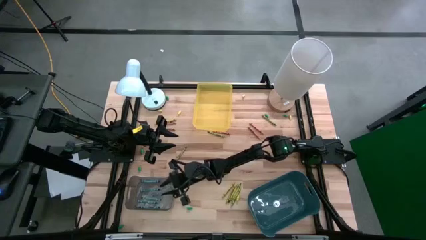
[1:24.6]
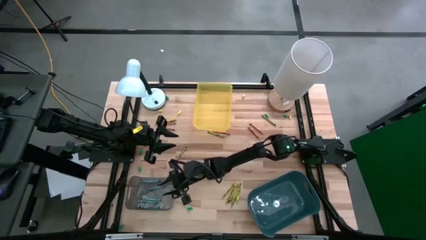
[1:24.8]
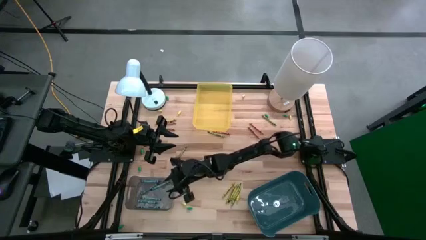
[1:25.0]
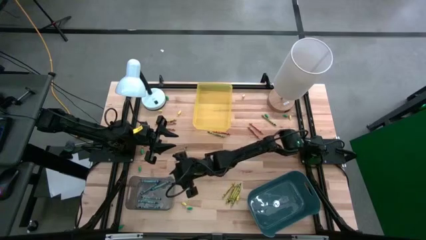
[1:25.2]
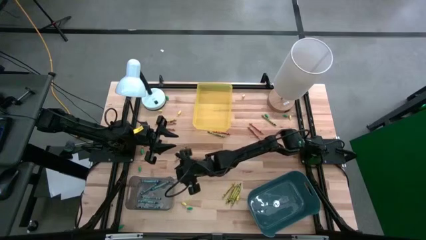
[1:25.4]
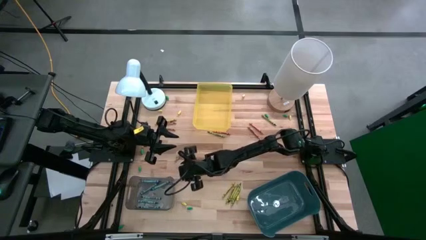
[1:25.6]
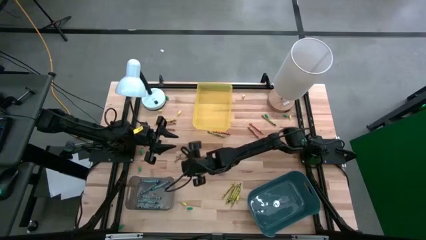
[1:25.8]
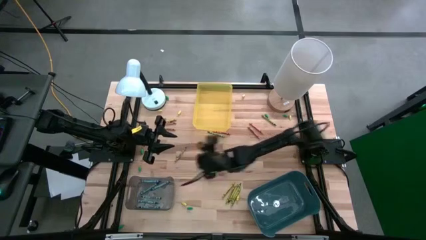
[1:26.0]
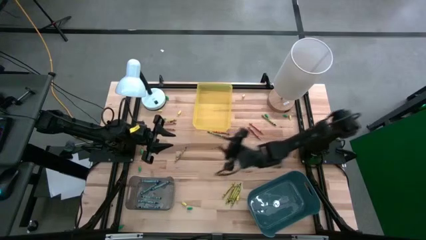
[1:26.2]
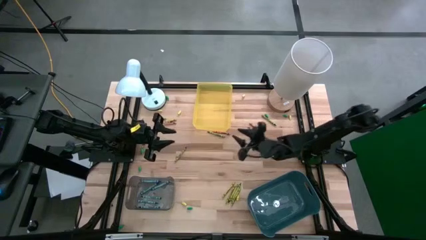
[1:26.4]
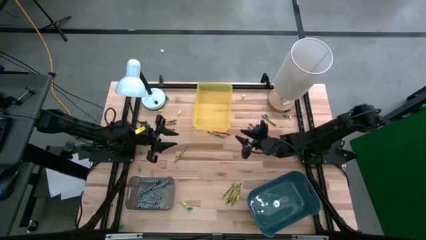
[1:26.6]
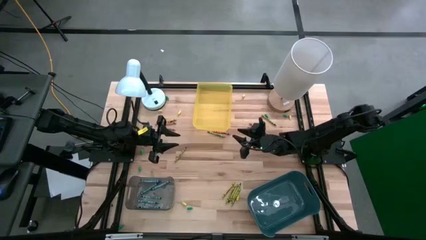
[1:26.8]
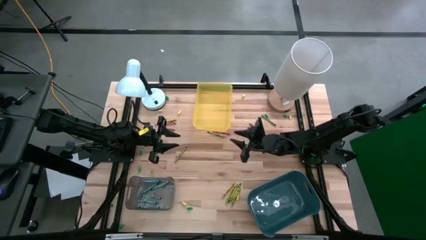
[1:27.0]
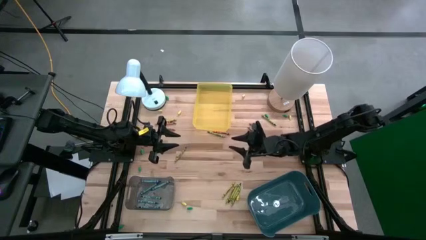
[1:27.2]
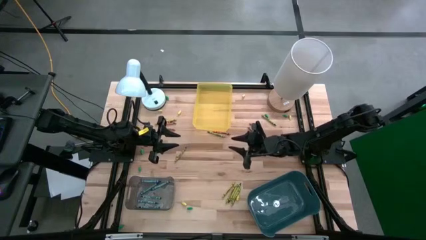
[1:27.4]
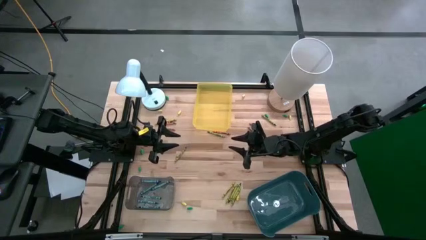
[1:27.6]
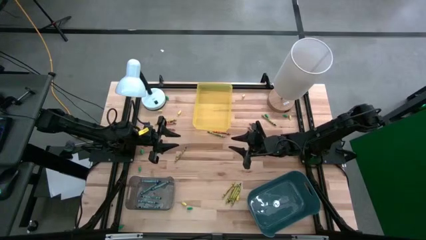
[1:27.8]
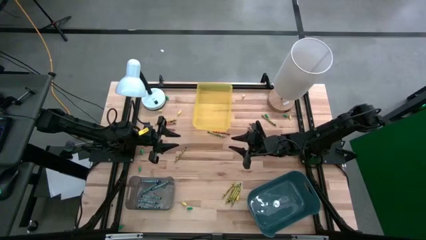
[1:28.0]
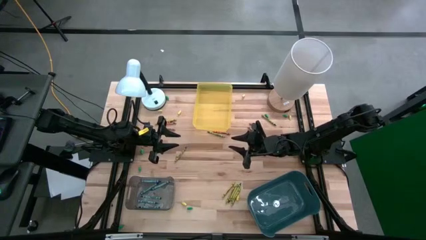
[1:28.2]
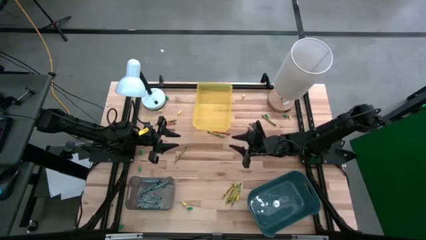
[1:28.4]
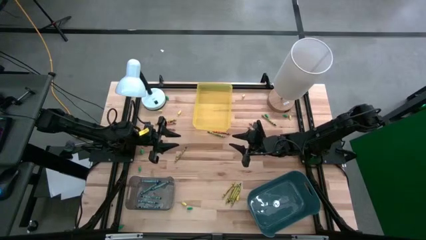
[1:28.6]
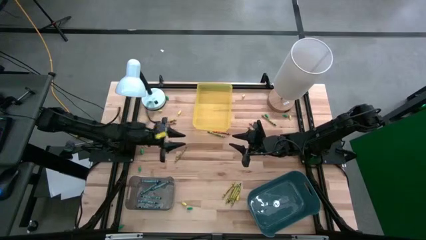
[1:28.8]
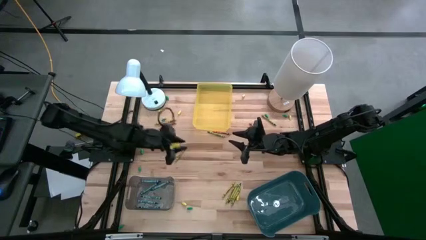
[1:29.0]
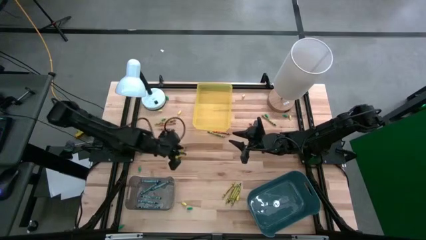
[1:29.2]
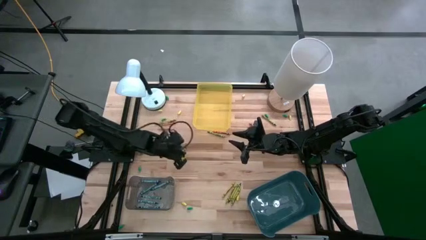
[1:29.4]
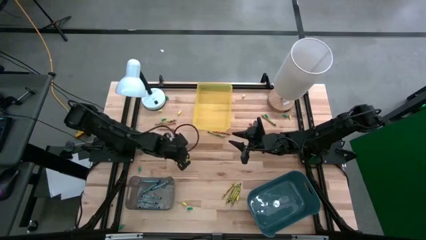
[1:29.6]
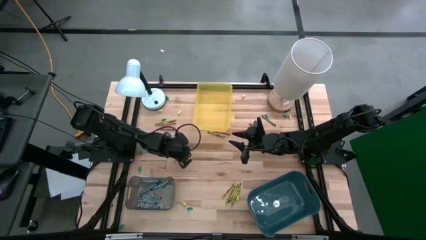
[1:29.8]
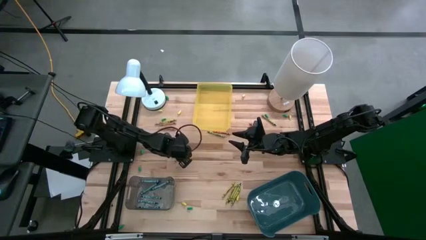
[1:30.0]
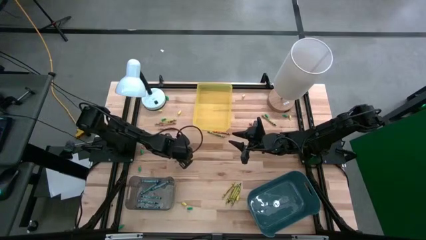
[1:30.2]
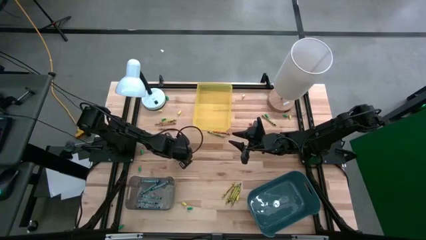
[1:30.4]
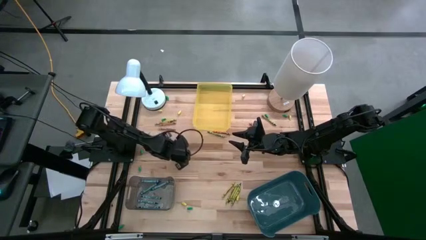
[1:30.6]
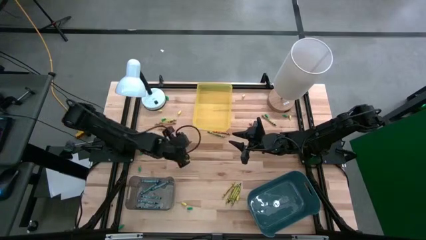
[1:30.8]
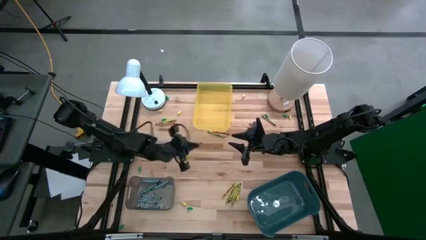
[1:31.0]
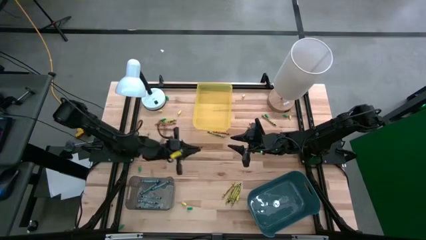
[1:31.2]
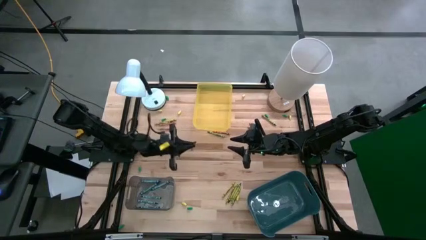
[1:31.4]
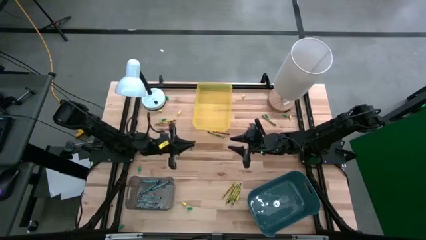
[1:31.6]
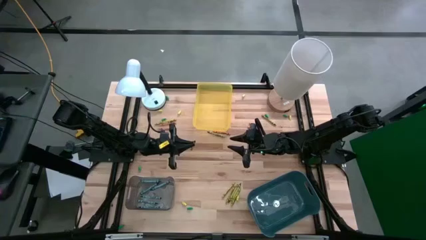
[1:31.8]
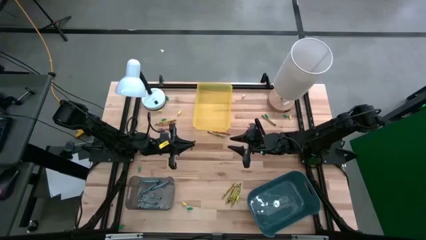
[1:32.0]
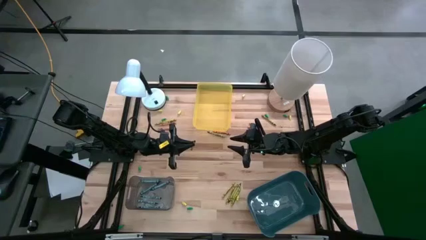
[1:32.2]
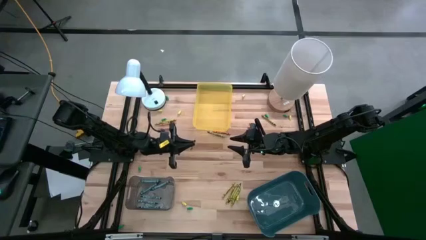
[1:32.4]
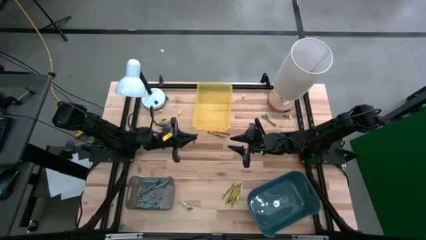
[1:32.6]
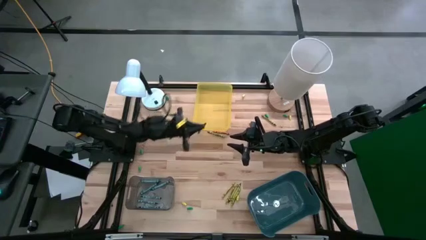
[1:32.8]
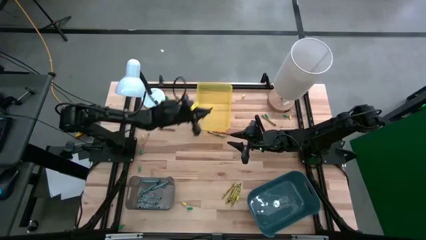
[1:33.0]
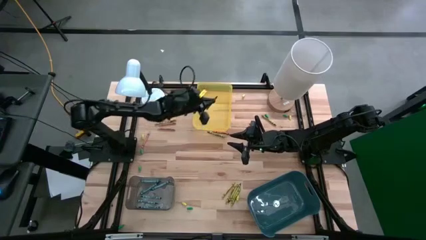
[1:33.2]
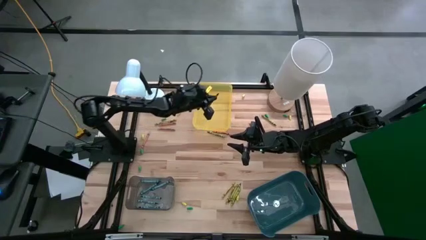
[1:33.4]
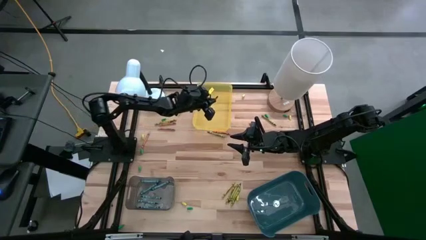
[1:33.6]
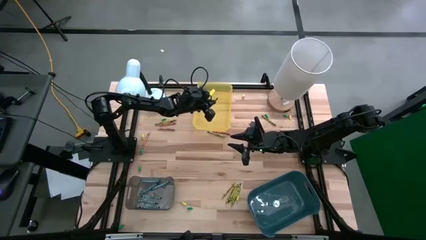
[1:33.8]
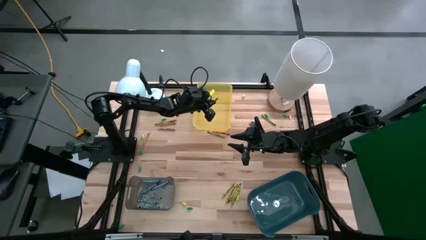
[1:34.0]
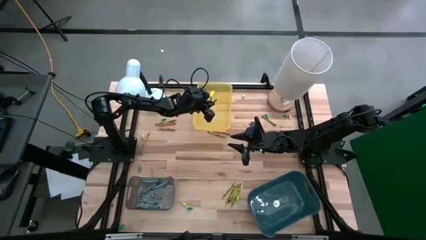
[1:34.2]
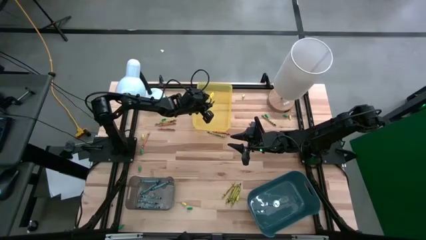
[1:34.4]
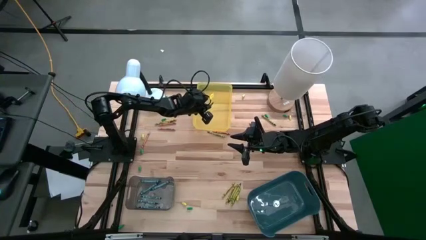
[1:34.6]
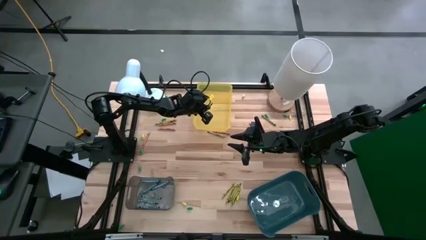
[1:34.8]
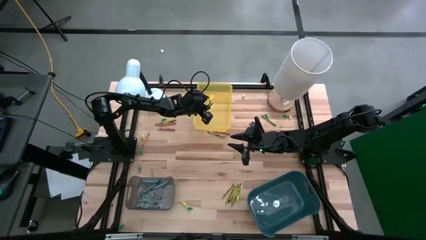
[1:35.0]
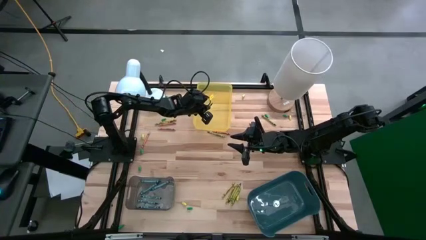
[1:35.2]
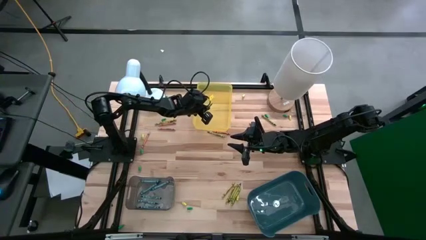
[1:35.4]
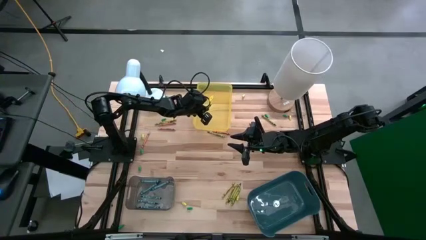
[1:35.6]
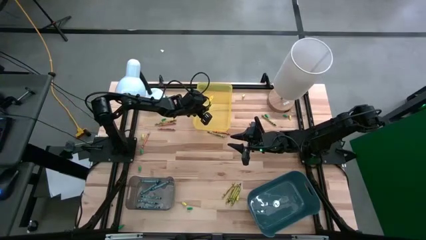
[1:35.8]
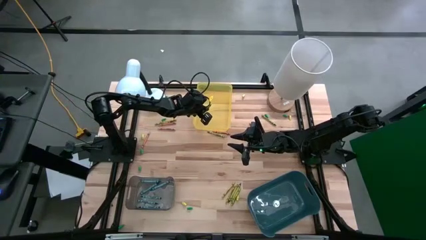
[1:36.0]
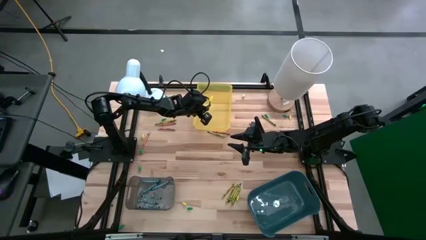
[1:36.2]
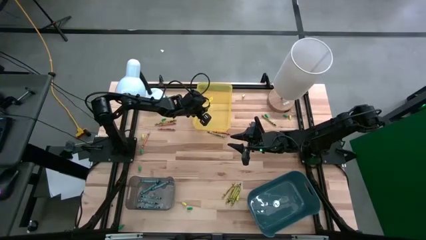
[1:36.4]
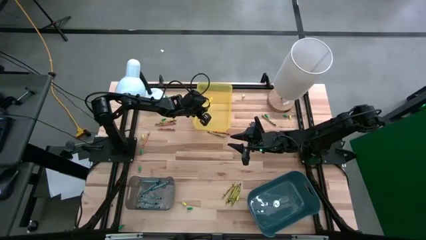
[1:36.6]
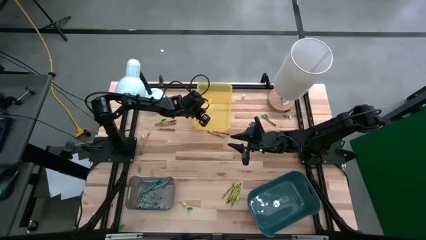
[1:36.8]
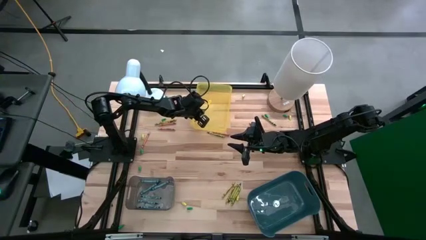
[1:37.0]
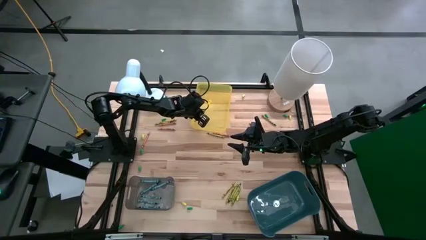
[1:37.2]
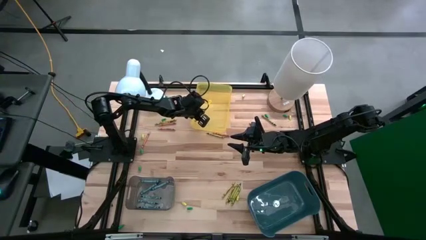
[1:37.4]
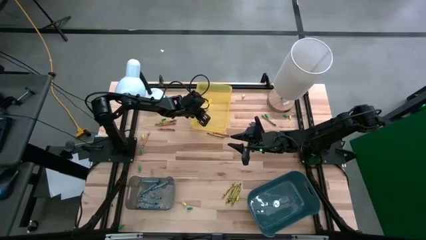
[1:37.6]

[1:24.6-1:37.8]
Task: Sort crayons
Put the green crayon into the yellow bin
